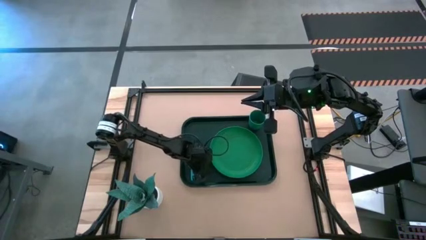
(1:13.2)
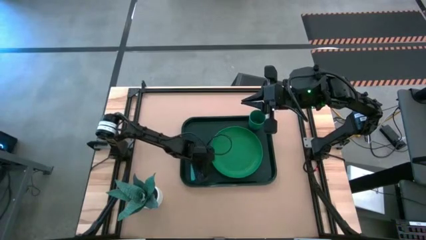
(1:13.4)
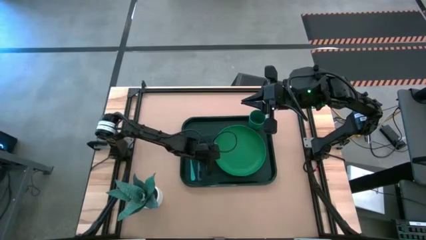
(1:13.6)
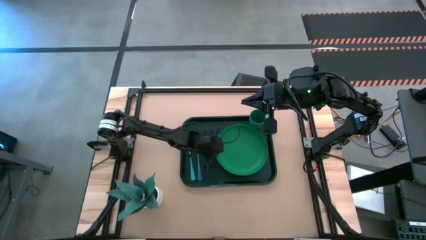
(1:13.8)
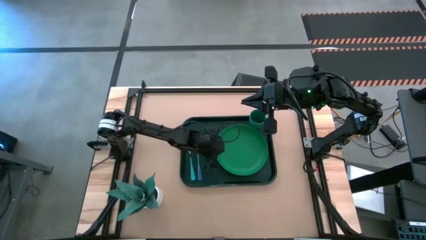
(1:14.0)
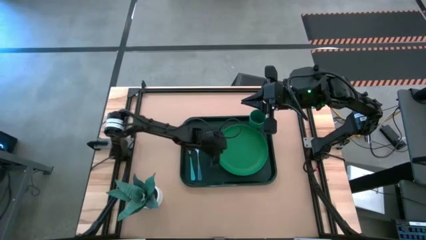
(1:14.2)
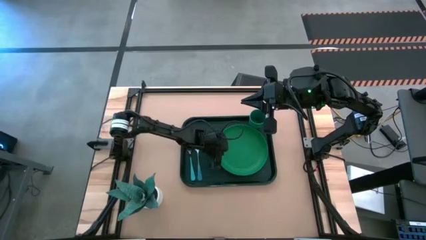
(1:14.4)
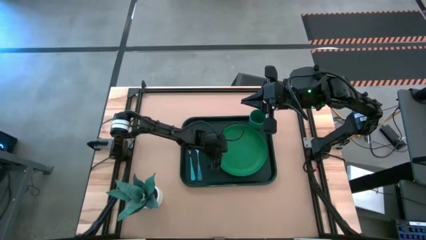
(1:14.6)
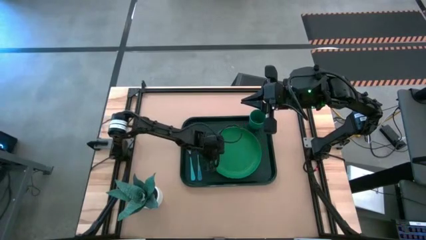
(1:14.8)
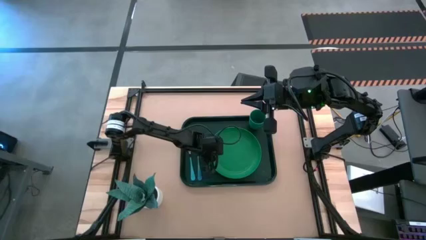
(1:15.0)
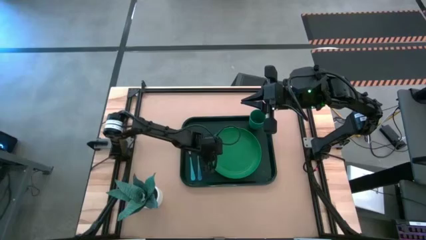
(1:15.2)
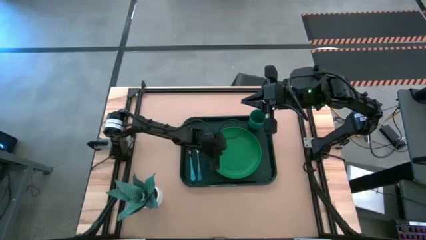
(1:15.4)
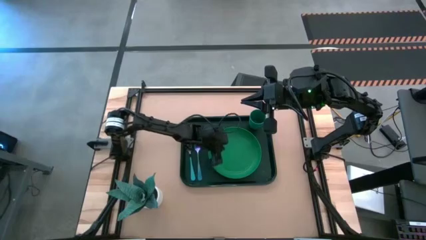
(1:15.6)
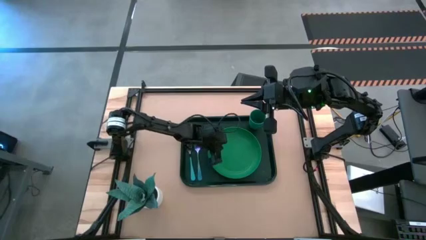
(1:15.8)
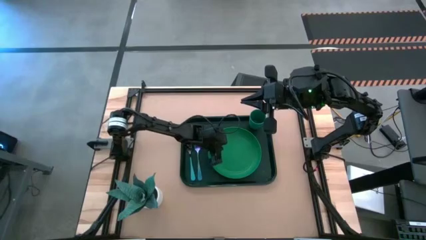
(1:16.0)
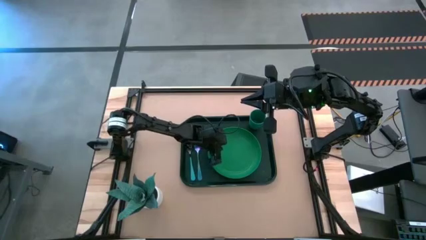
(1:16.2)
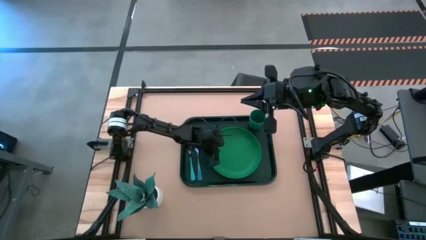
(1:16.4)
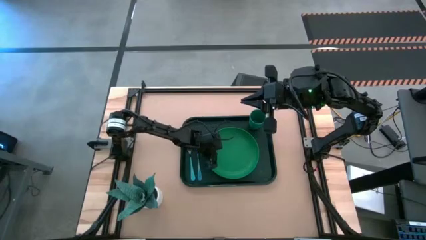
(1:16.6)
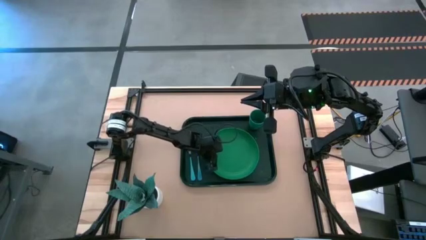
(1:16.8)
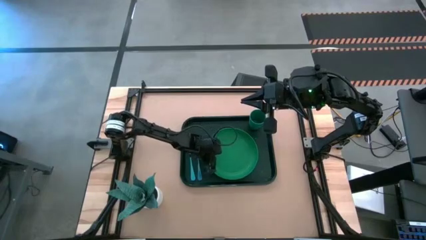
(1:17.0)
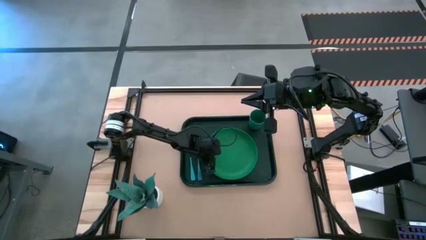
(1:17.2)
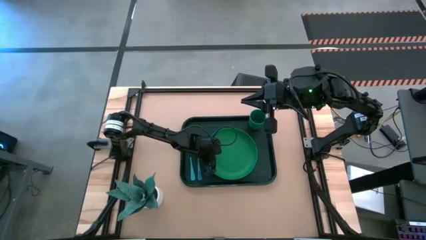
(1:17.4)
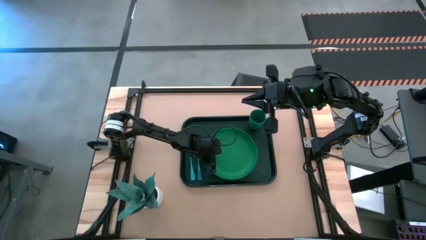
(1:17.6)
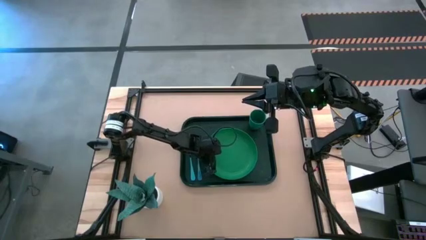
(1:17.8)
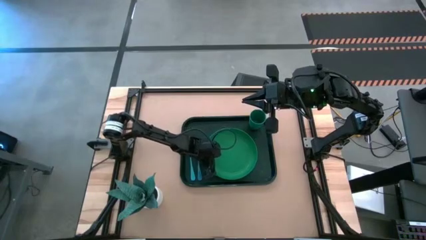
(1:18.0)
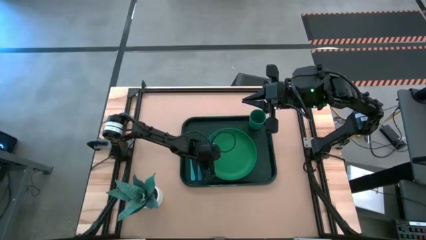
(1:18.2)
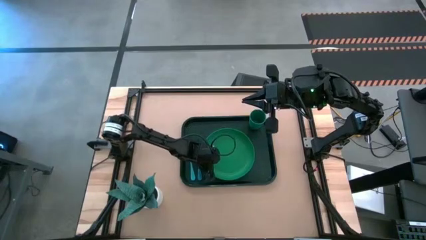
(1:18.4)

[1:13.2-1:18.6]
Task: Pick and place plate/cup/fork/spoon on tray
Adjust the green plate on the dark green tray

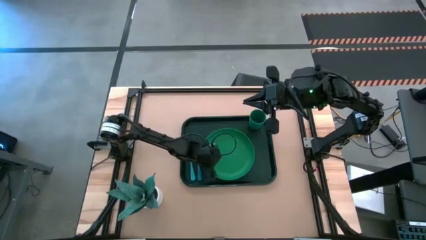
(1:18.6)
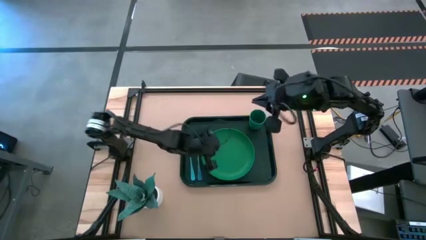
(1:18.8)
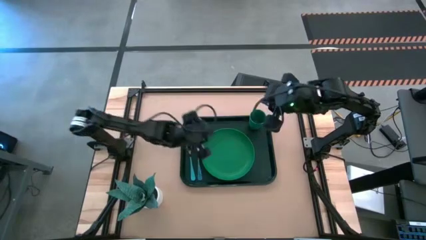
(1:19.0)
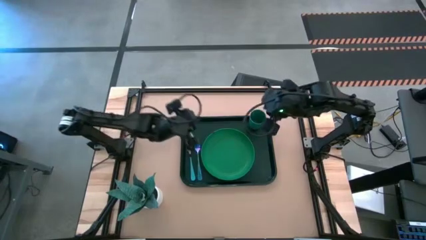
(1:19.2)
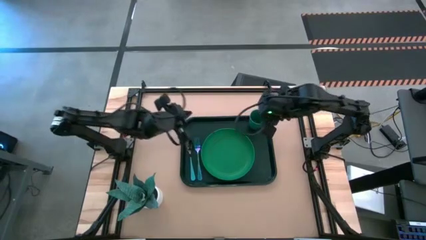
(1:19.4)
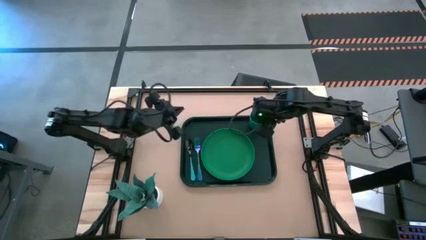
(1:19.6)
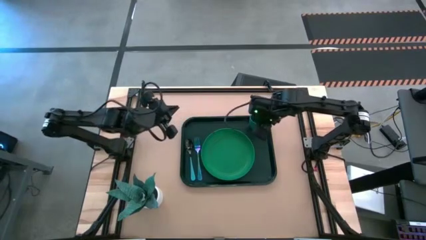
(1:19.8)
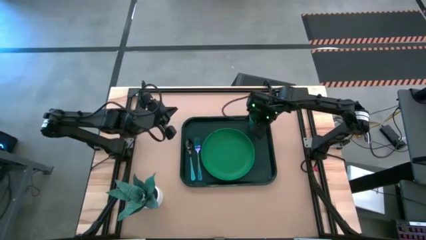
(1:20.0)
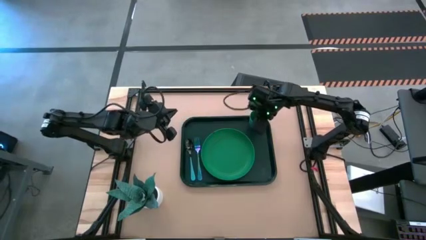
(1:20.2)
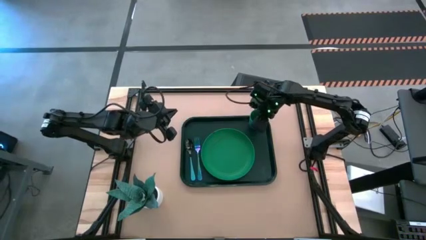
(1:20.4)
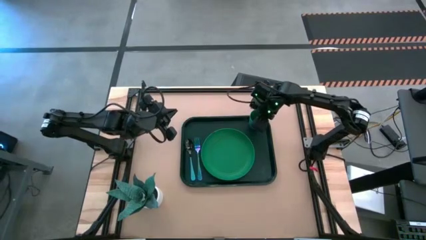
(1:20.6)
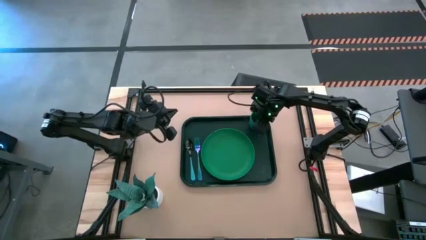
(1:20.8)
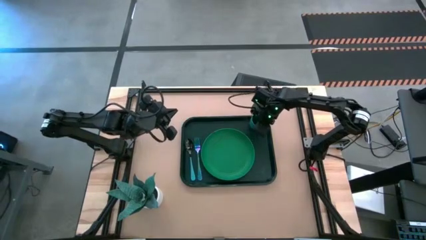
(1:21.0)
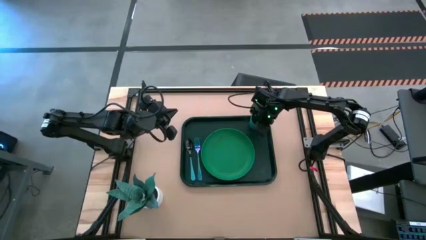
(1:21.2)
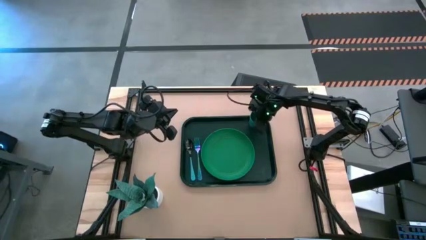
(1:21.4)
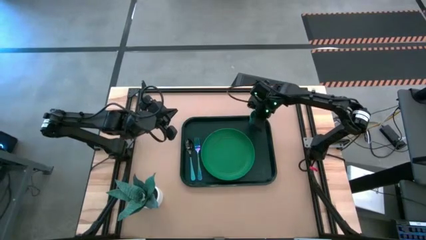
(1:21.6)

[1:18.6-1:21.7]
Adjust the green cup on the dark green tray

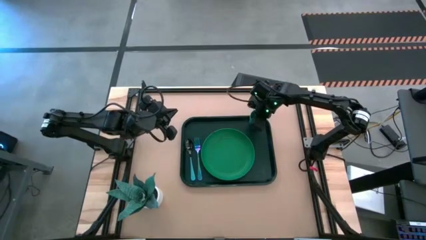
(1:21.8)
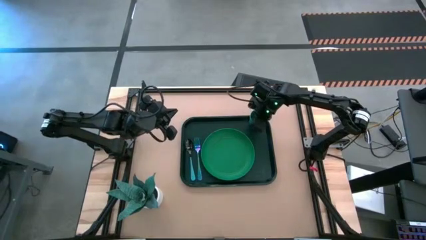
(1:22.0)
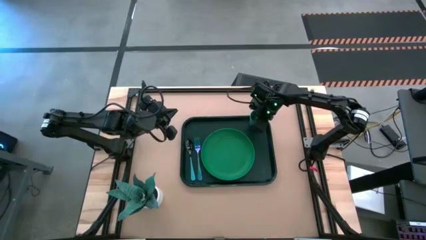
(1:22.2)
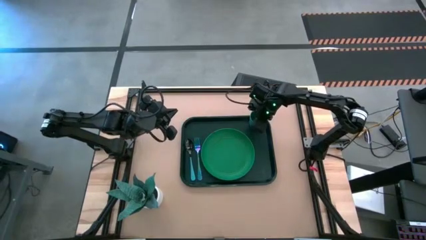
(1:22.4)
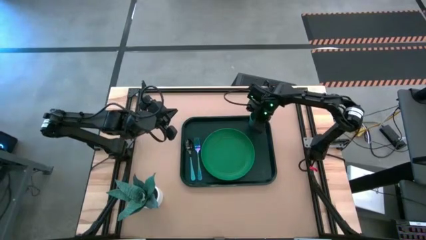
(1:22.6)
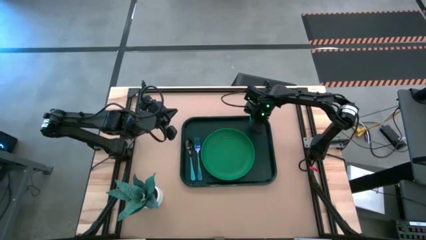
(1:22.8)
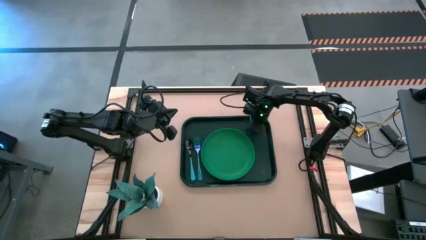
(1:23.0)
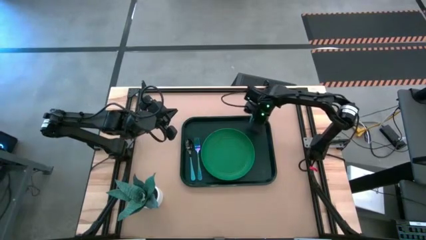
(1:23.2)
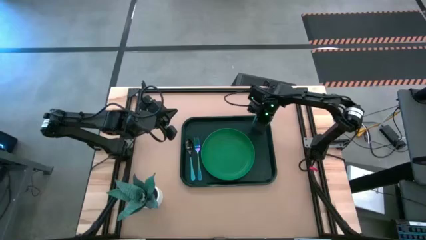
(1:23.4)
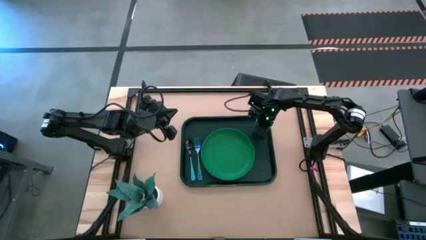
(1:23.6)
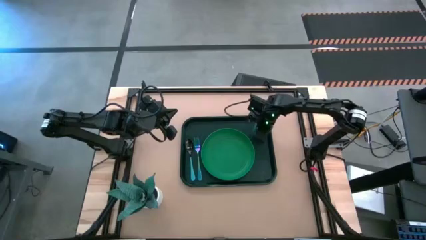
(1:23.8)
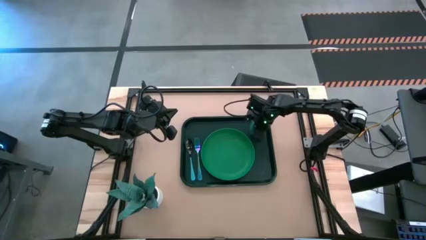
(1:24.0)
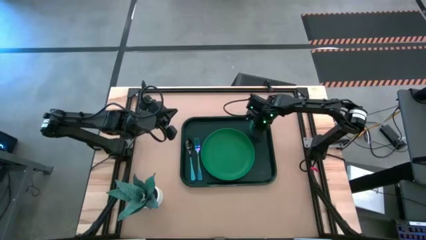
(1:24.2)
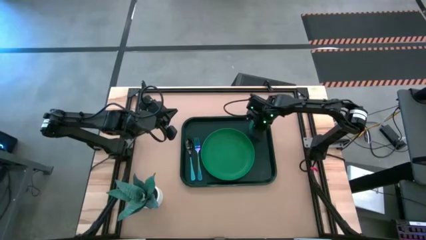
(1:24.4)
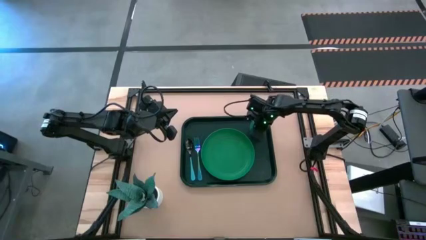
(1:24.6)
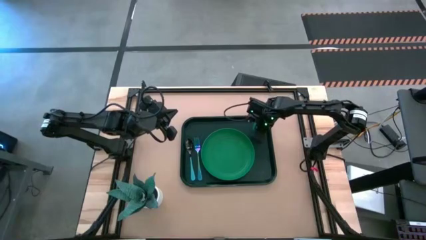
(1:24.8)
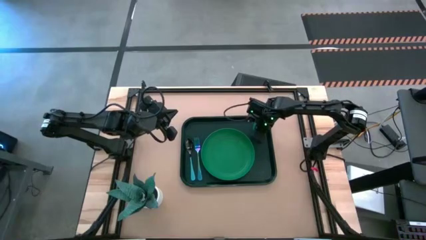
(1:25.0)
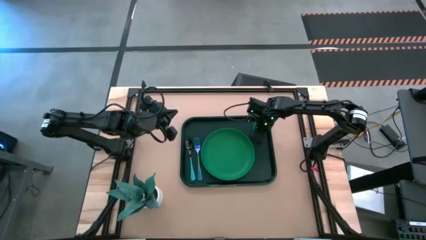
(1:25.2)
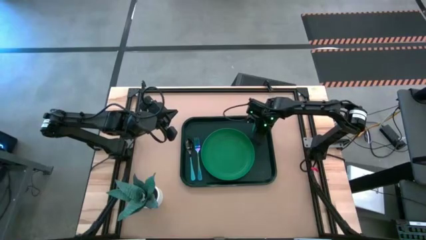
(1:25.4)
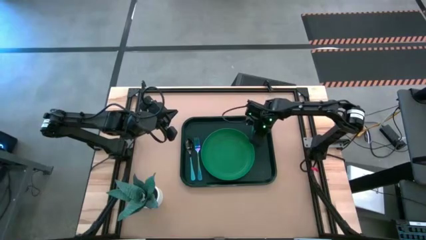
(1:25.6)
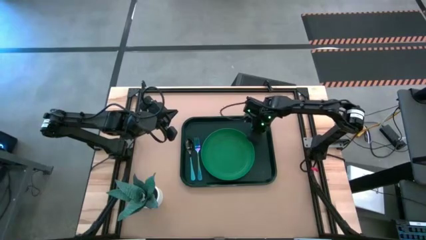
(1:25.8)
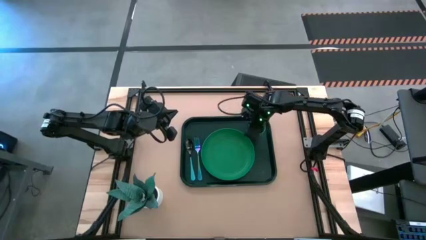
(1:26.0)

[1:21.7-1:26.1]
Adjust the green cup on the dark green tray

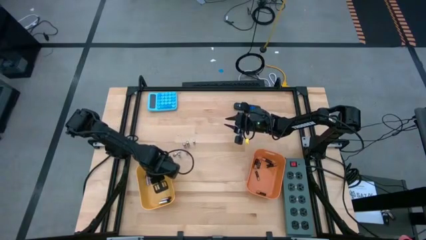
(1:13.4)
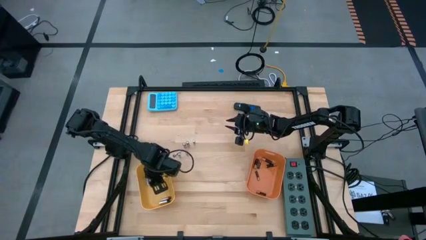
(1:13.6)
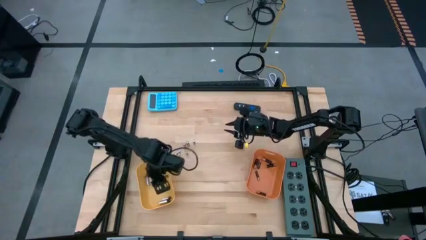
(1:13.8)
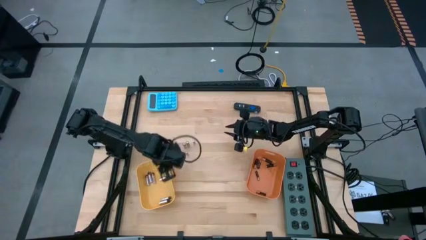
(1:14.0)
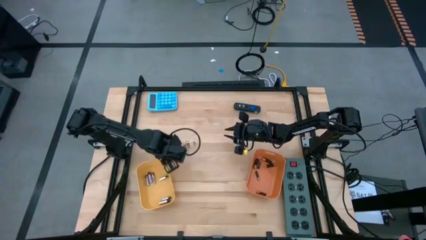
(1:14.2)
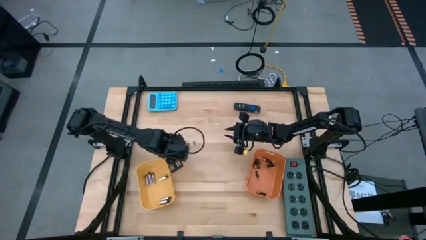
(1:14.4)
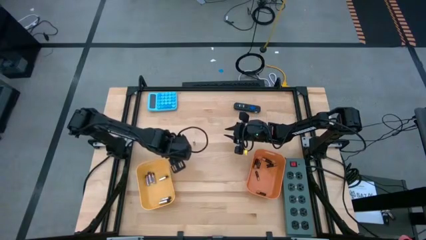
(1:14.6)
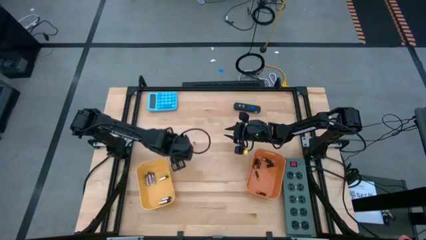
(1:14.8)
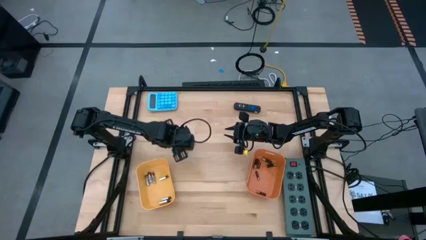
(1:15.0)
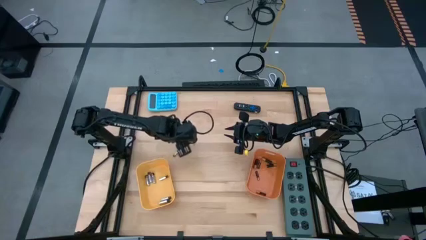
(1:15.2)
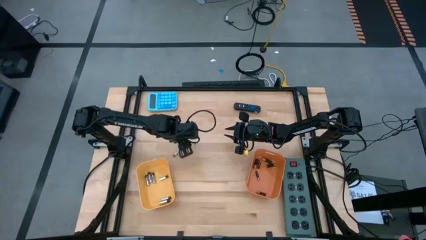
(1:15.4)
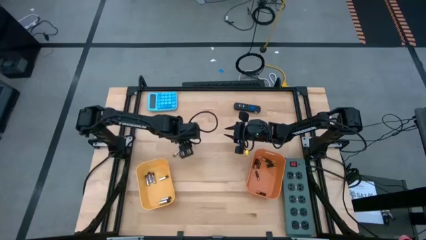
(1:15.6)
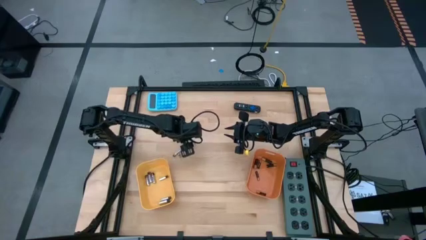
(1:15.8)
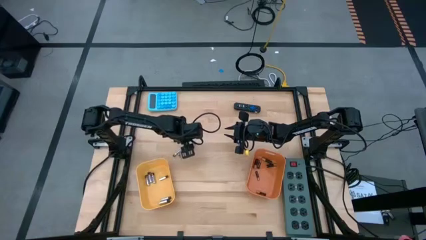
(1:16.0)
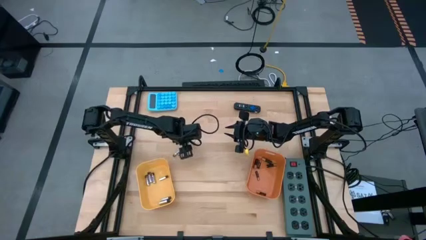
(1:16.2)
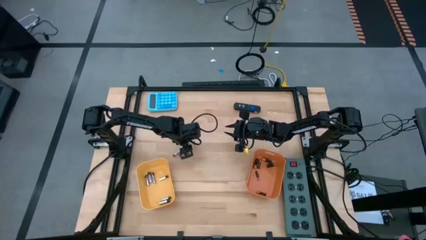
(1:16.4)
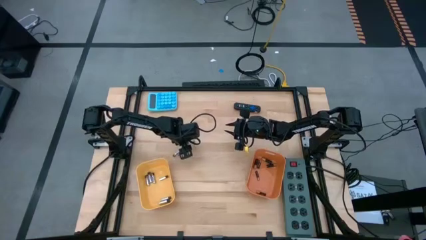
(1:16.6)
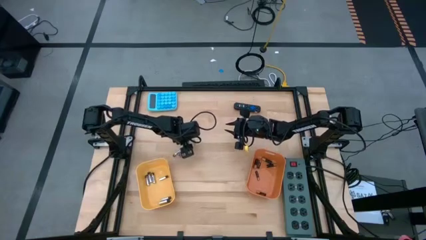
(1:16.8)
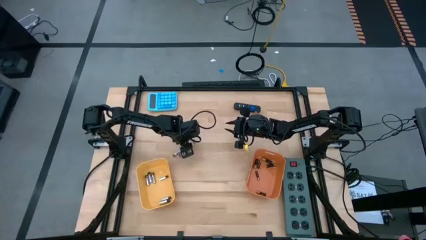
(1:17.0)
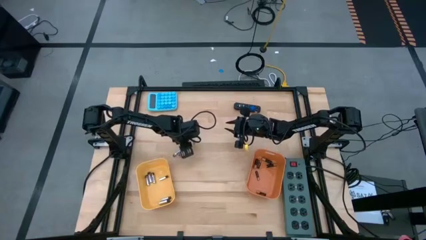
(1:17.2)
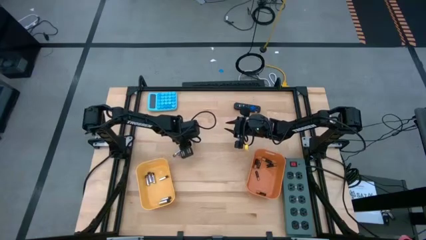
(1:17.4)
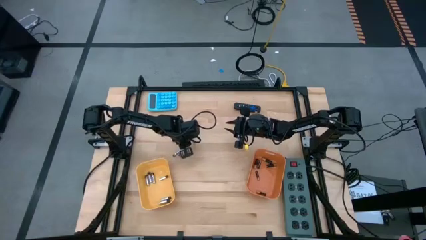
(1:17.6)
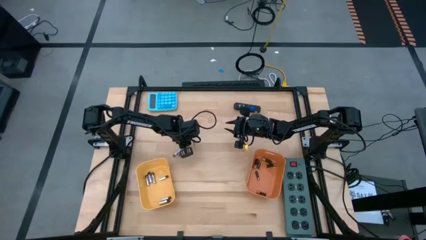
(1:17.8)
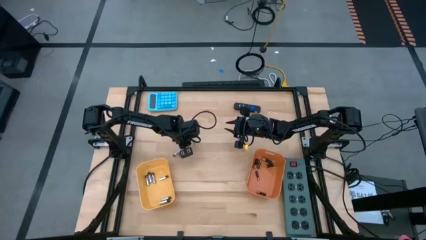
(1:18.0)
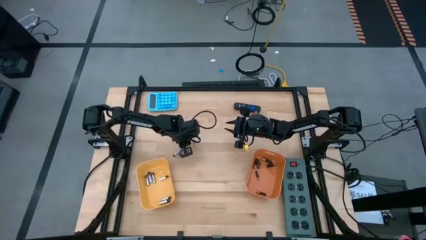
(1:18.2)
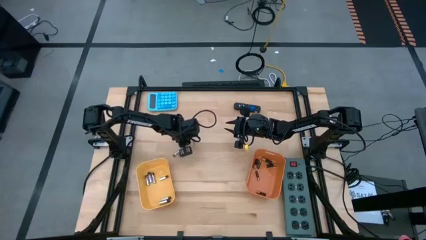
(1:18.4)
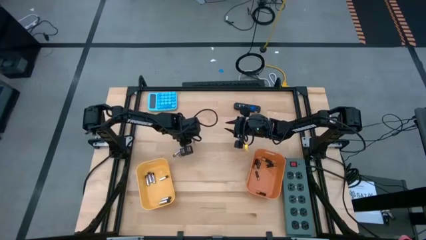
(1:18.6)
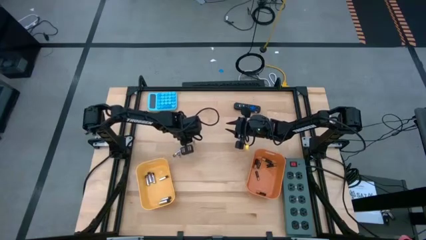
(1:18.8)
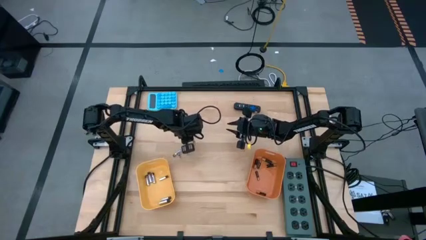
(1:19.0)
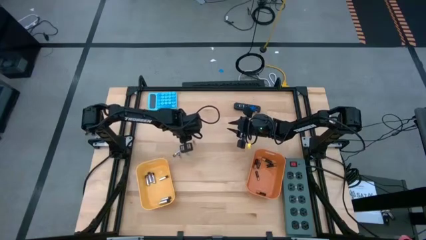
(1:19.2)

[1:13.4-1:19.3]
Task: Sort batteries
Put the silver battery into the yellow bin
